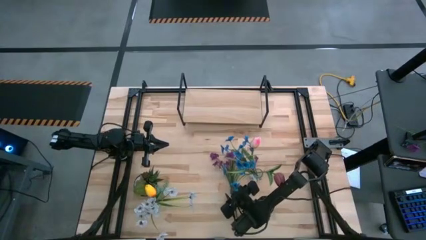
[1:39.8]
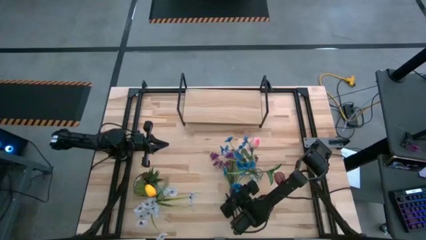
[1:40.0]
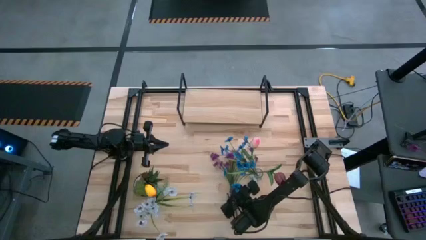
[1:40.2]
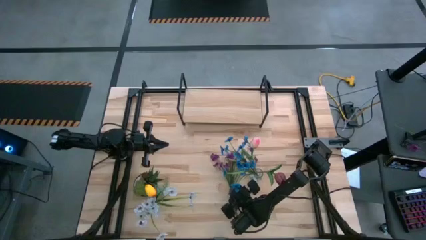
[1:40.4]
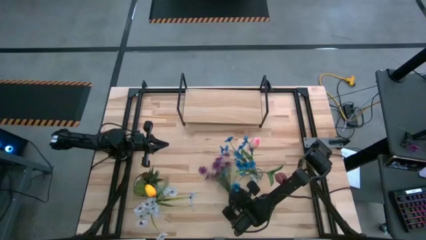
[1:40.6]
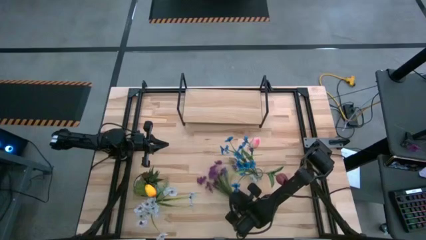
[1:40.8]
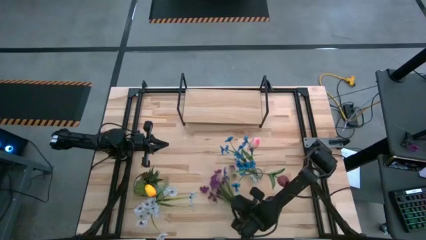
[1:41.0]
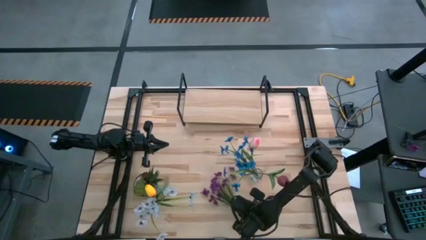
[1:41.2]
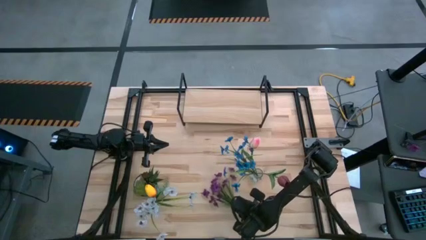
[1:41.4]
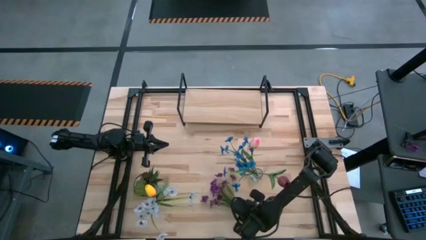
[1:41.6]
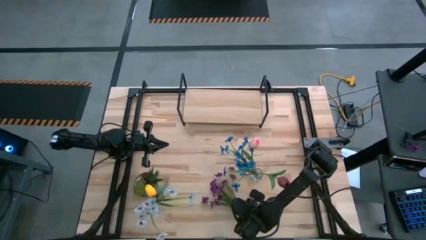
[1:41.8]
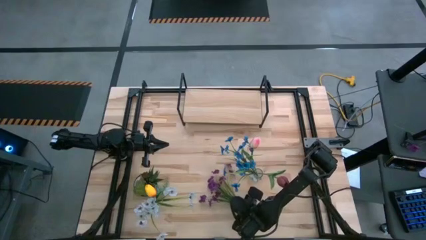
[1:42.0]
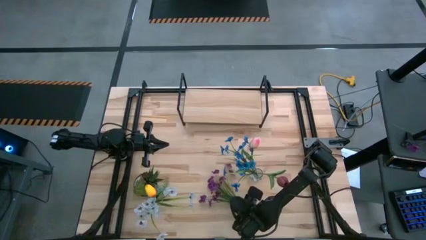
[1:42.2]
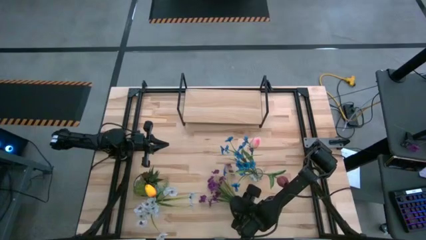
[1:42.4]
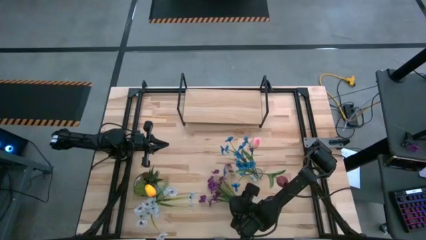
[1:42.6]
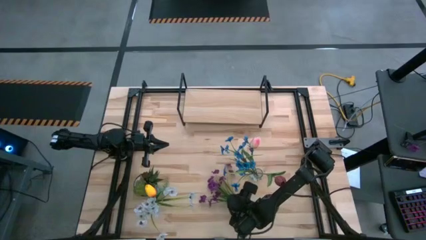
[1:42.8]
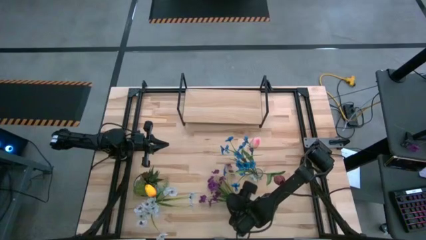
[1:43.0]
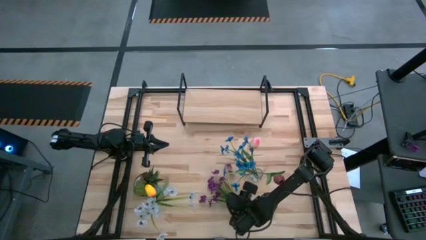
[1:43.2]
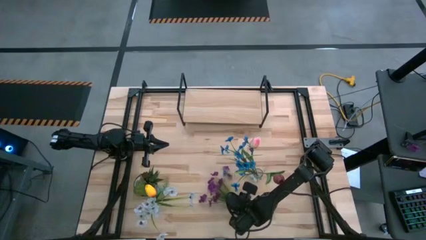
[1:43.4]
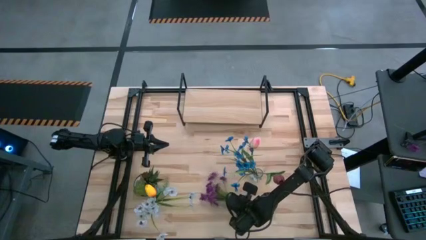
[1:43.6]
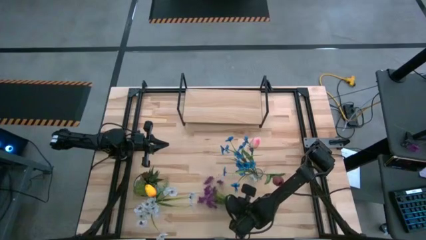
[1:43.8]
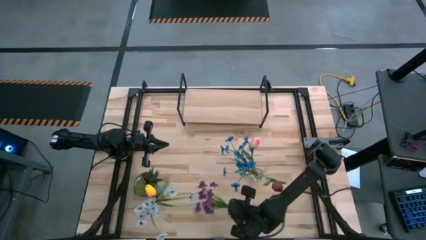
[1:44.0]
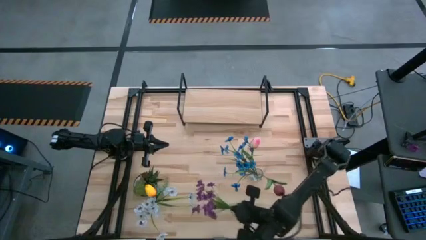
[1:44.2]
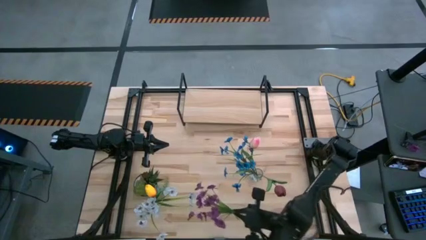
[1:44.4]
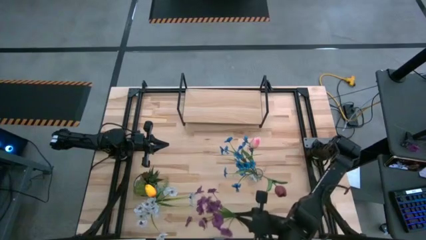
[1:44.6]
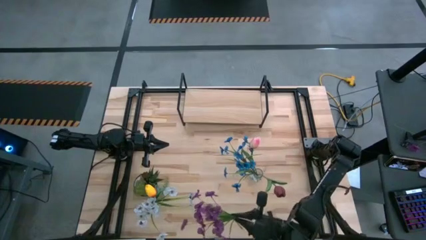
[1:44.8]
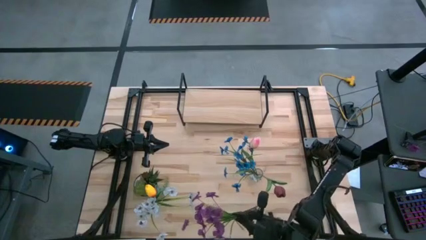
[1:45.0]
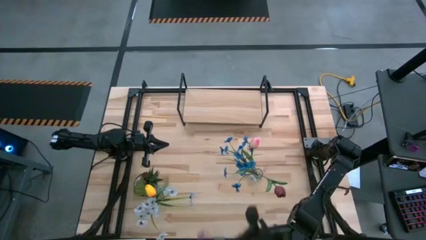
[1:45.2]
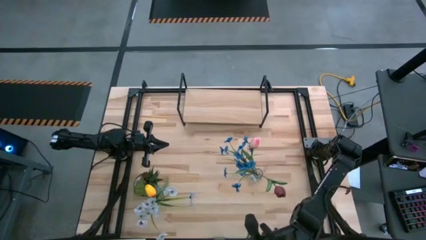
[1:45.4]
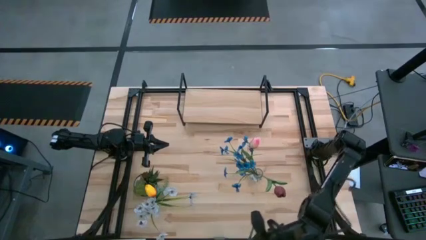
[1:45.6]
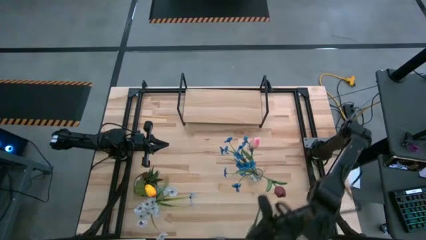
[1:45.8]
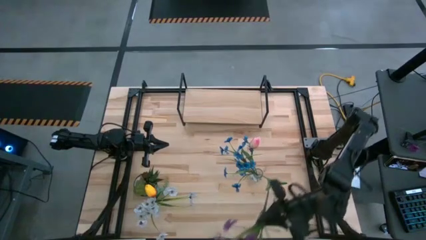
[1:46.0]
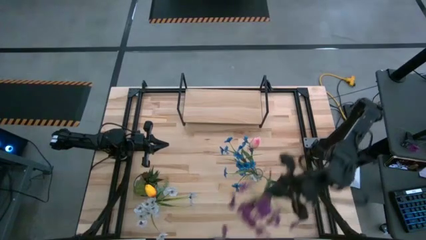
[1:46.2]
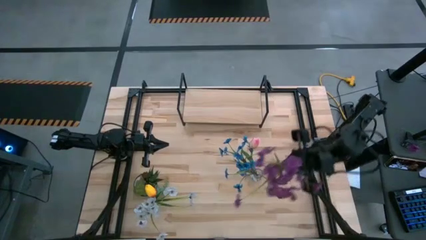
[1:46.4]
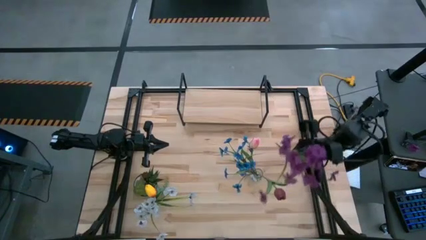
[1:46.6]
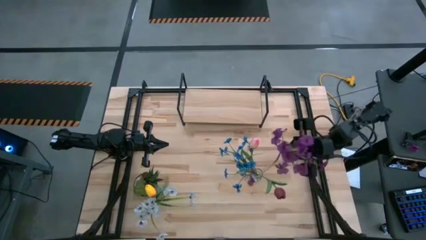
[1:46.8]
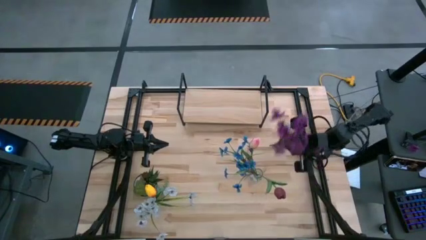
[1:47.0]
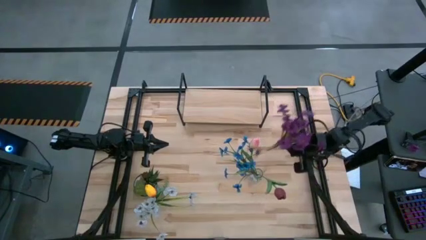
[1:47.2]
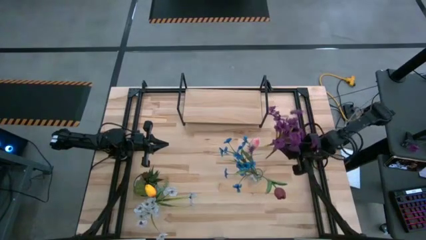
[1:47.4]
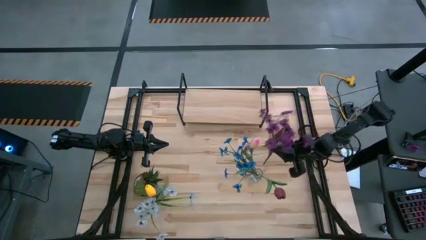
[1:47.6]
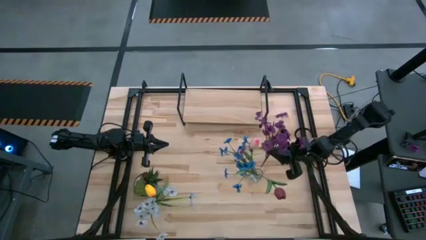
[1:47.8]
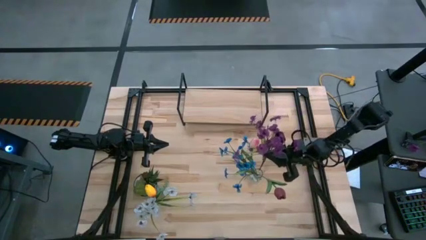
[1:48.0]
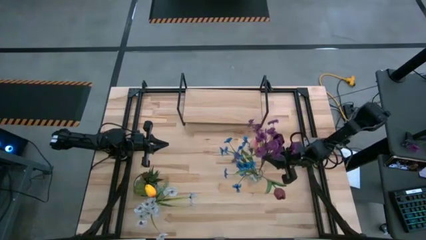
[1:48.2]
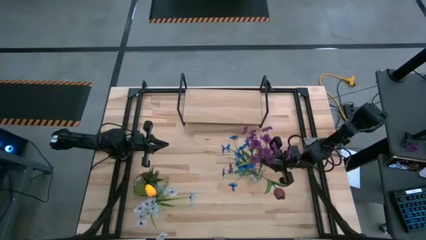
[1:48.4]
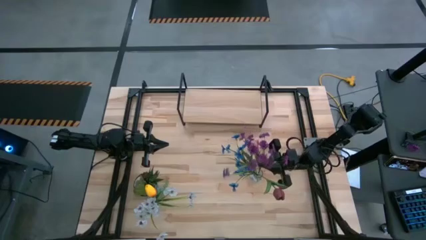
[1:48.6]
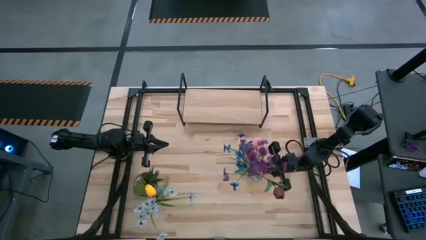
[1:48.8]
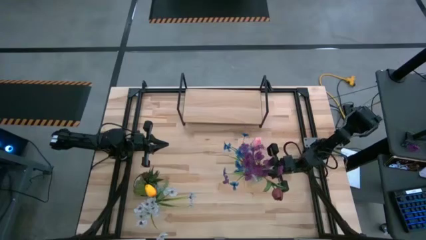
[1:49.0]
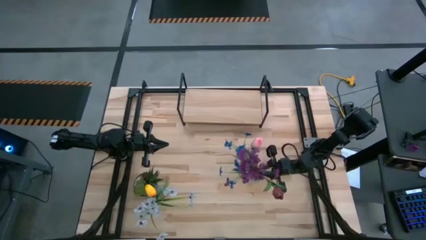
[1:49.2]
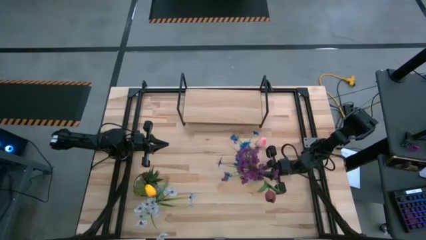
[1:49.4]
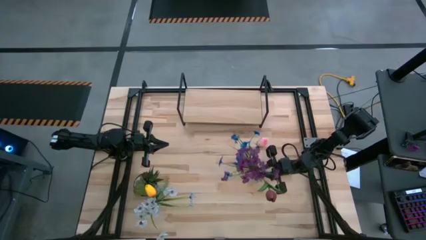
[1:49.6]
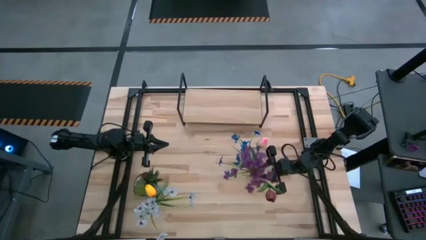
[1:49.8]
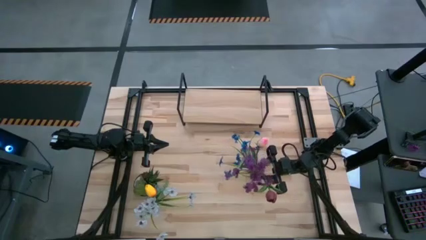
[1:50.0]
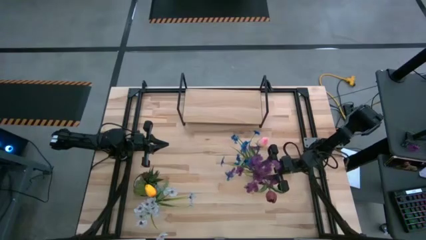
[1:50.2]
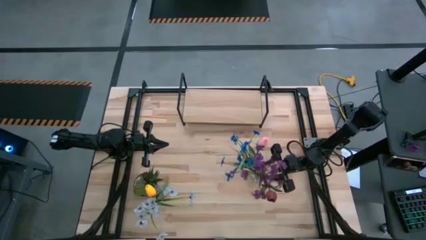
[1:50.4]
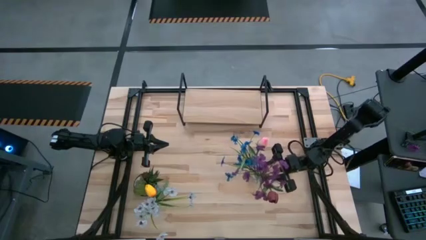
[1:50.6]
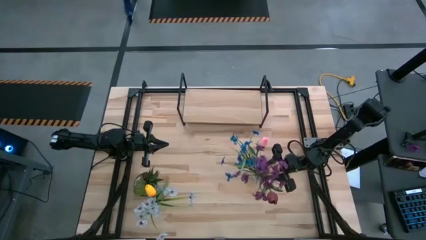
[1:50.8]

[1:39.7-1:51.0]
Task: Pick and place flowers into a vace then onto a shelf
Put the purple flowers into the right transparent vase

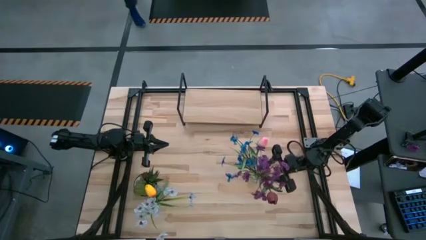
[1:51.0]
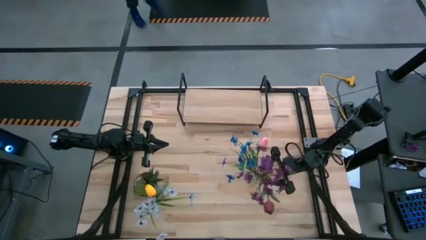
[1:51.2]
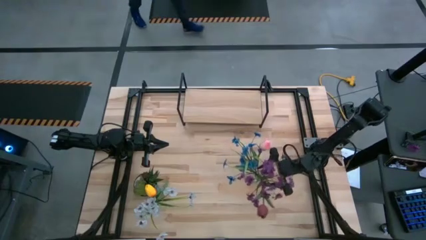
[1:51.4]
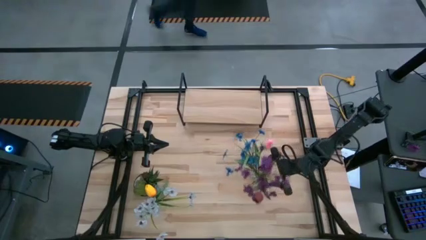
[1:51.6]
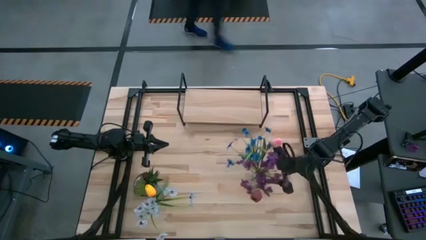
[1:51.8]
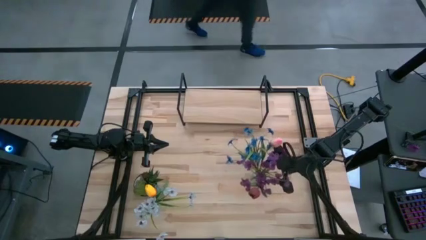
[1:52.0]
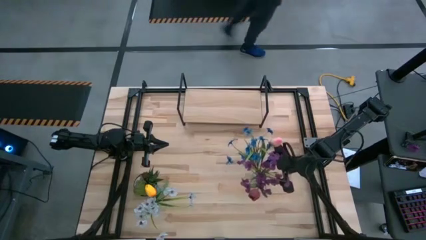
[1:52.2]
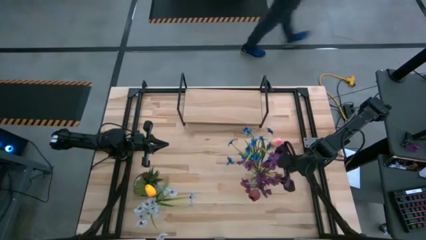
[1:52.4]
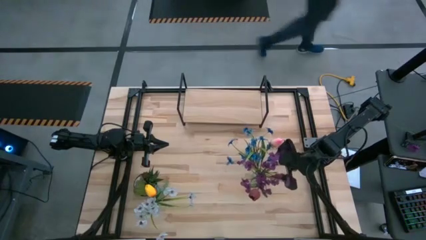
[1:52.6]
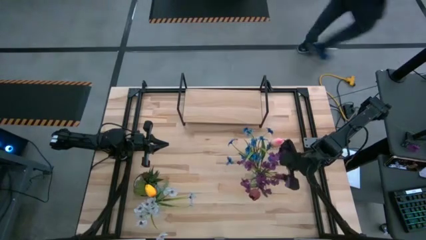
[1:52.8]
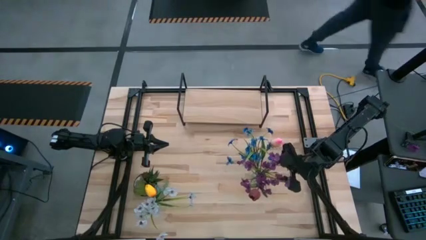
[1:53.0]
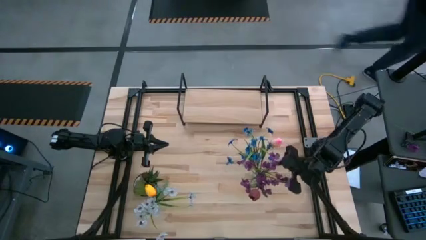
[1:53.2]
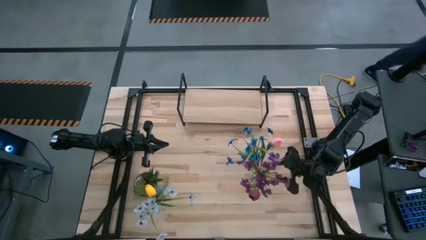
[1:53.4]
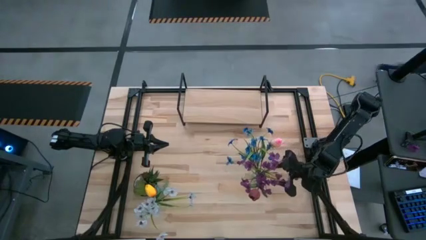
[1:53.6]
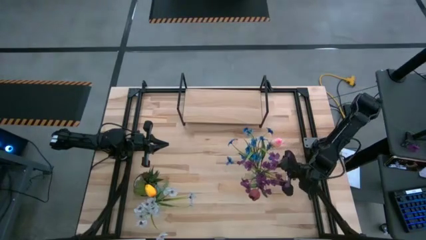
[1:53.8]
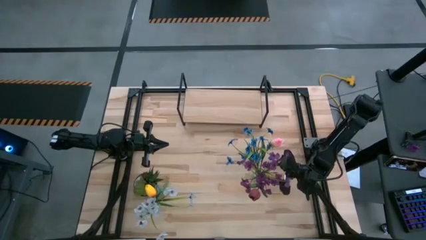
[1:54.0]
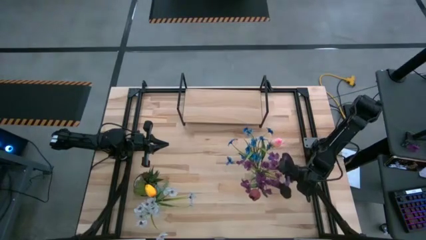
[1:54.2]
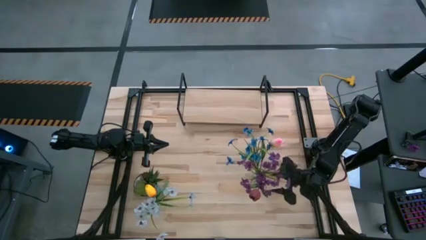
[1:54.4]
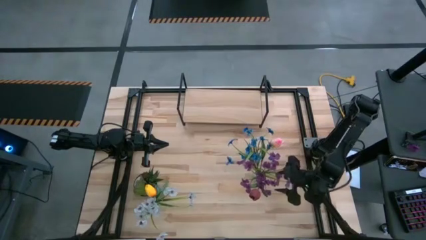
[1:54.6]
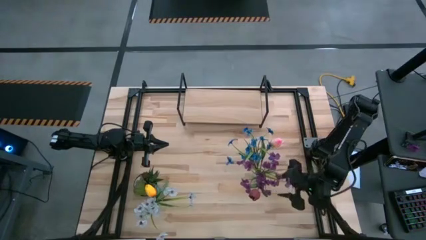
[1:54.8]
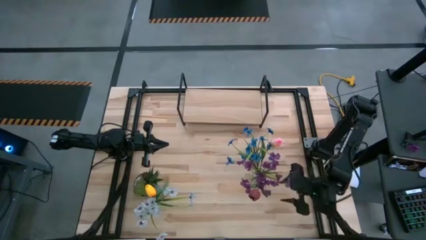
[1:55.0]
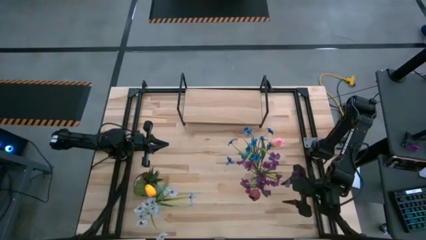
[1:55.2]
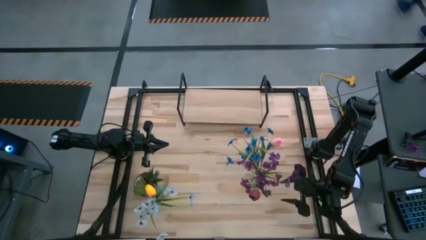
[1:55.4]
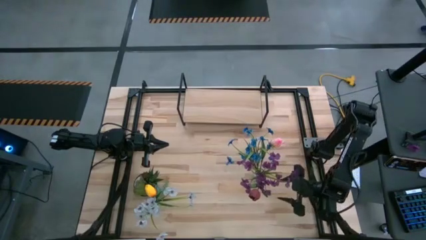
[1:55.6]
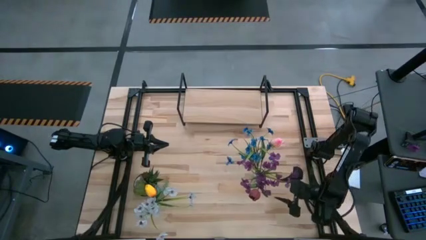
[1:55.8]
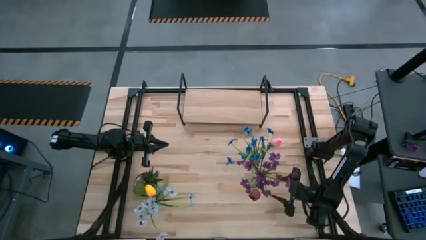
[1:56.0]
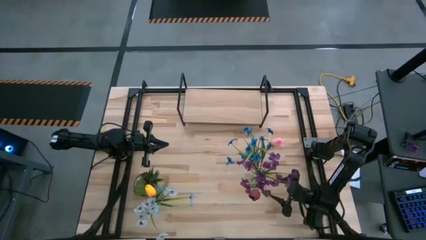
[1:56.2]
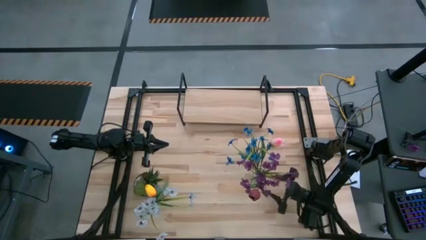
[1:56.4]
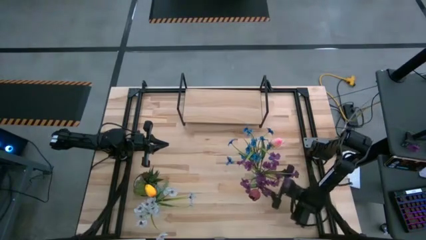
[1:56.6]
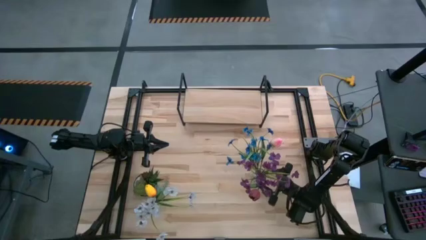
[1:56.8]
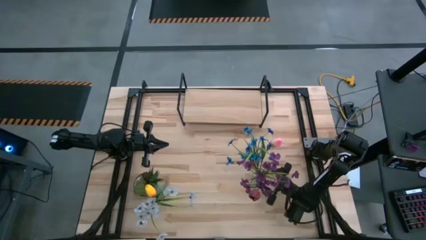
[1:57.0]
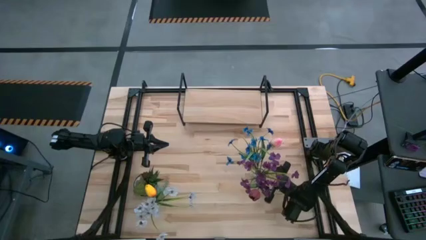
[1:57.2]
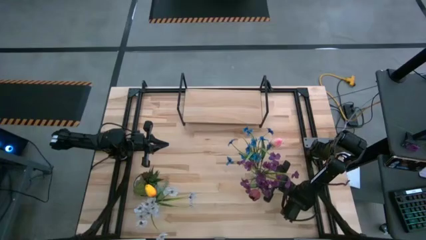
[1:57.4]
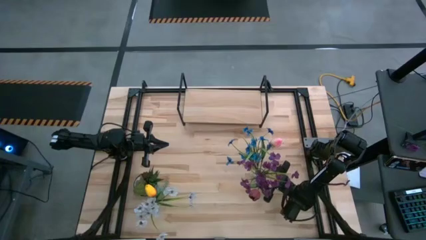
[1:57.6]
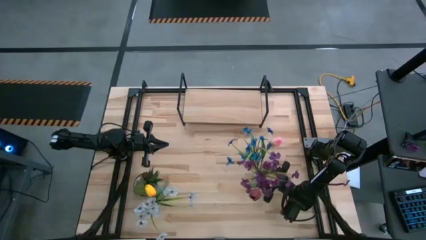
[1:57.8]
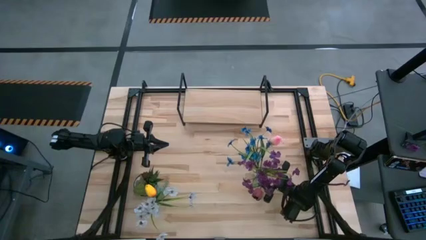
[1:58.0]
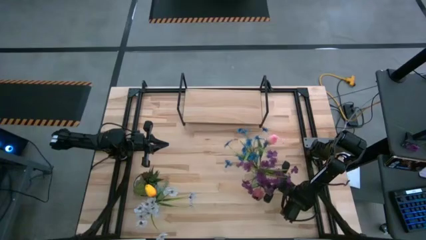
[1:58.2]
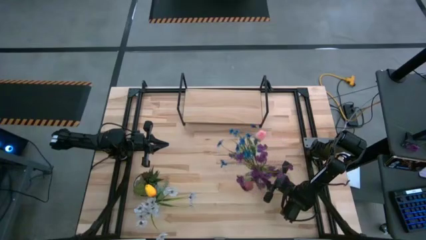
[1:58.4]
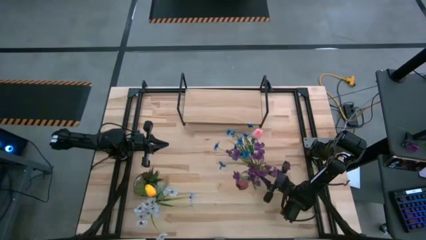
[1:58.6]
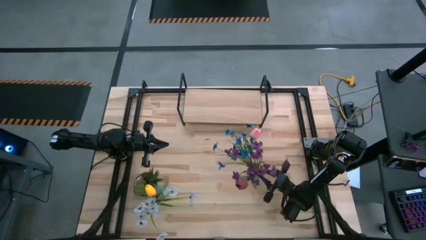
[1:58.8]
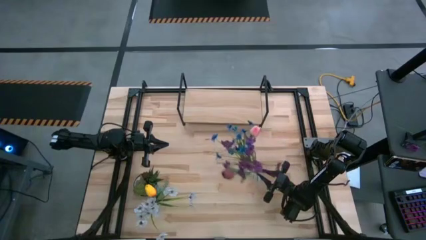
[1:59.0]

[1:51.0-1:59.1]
Put the right transparent vase on the shelf
